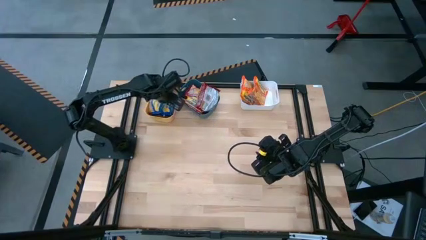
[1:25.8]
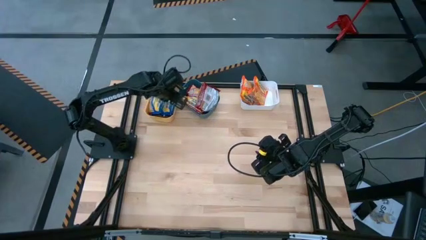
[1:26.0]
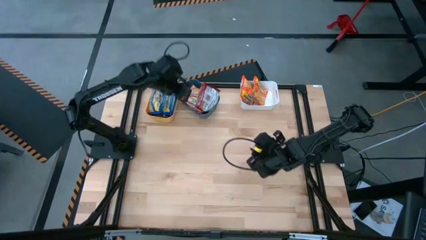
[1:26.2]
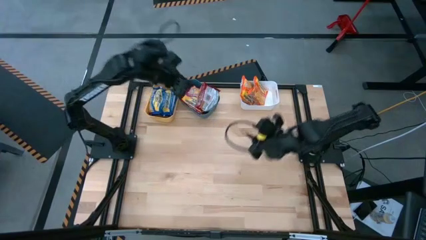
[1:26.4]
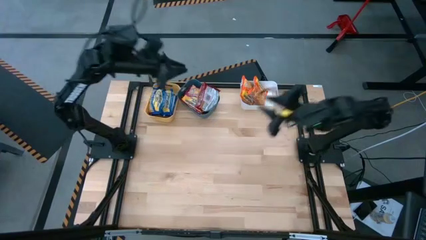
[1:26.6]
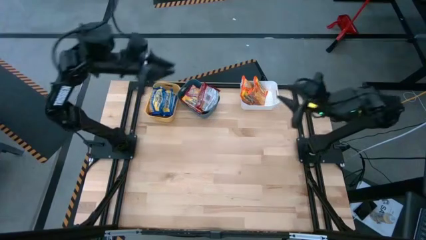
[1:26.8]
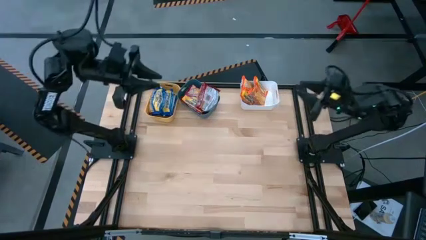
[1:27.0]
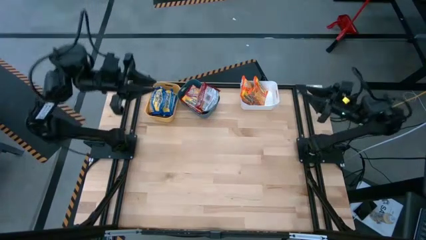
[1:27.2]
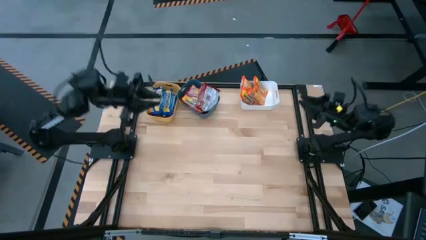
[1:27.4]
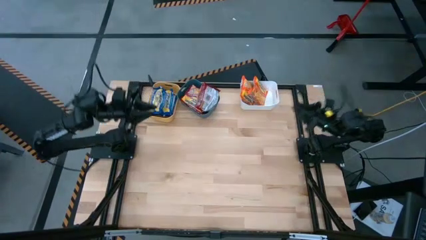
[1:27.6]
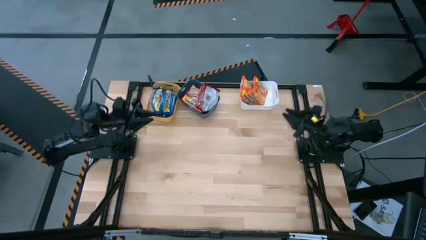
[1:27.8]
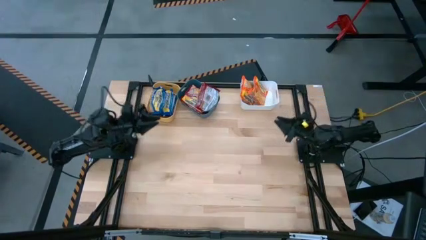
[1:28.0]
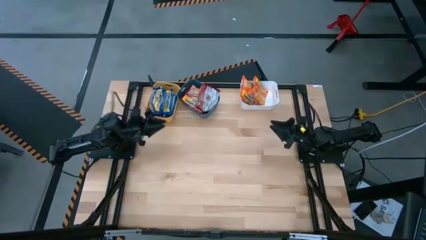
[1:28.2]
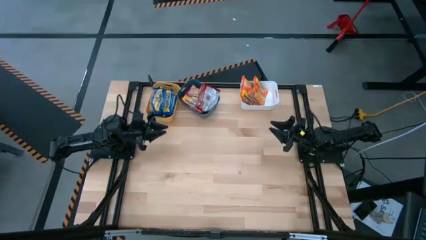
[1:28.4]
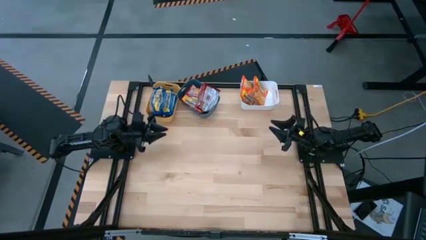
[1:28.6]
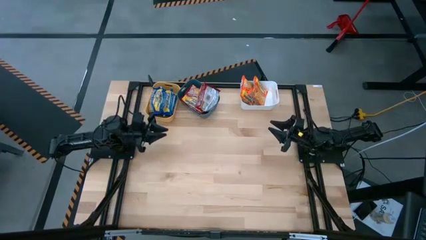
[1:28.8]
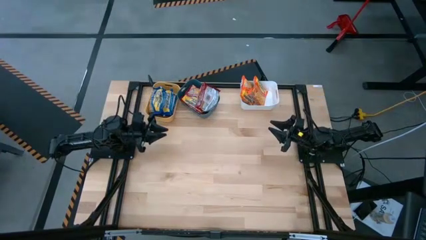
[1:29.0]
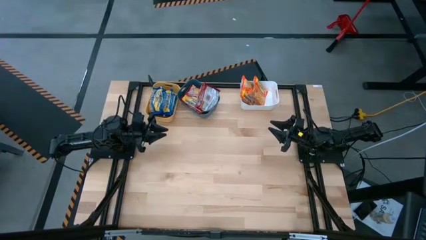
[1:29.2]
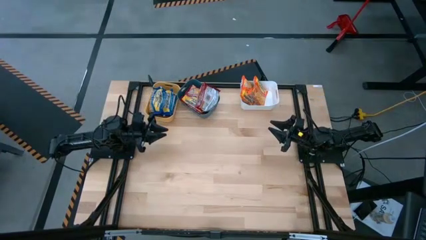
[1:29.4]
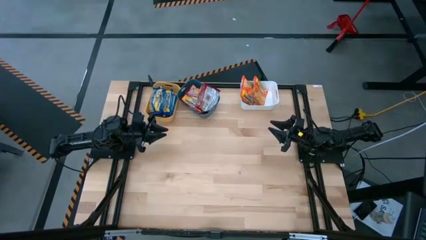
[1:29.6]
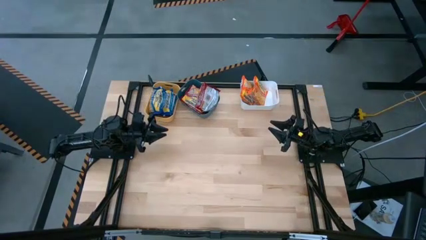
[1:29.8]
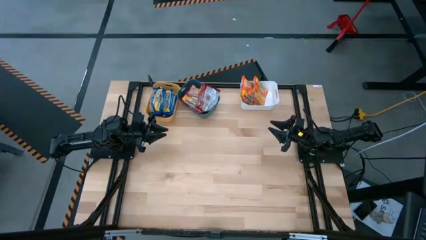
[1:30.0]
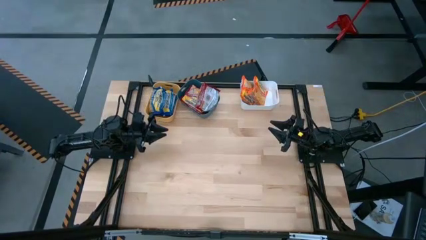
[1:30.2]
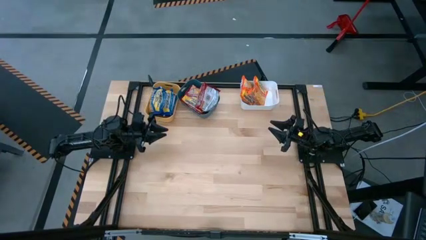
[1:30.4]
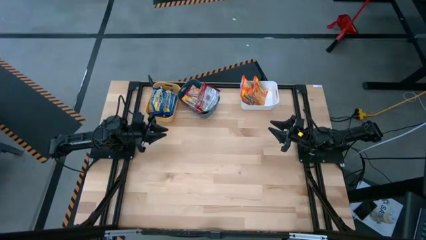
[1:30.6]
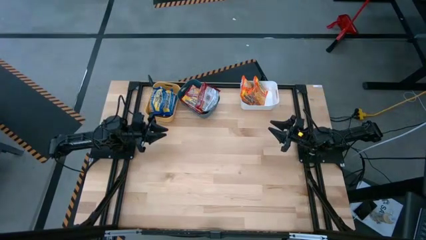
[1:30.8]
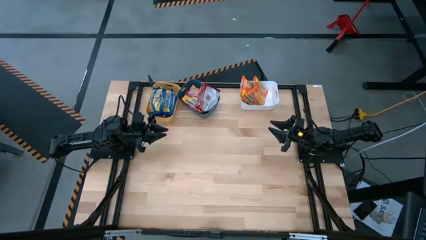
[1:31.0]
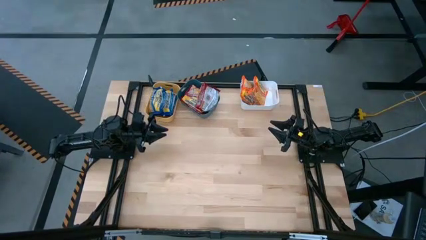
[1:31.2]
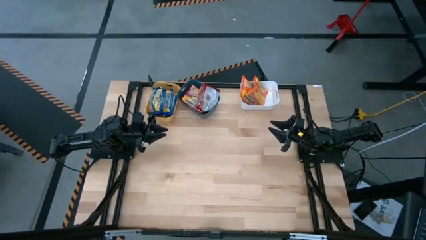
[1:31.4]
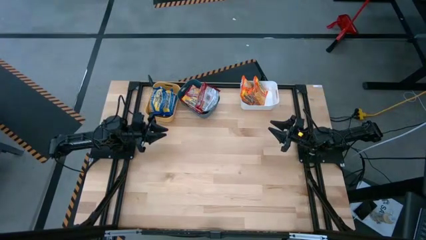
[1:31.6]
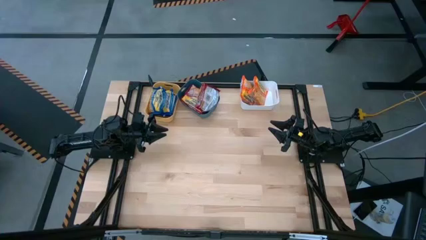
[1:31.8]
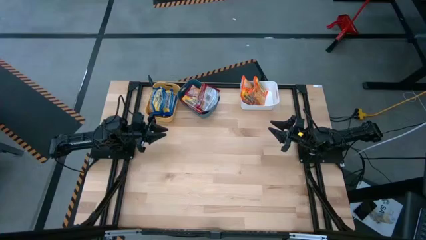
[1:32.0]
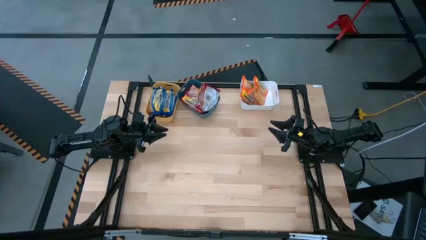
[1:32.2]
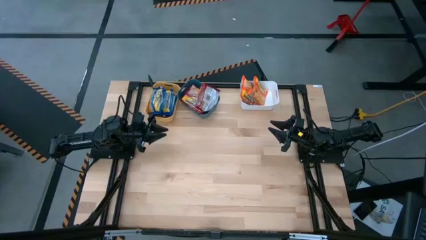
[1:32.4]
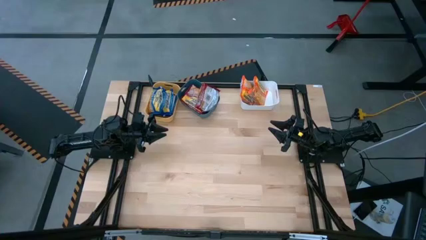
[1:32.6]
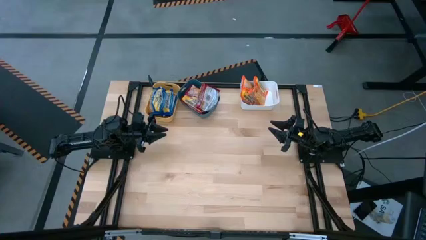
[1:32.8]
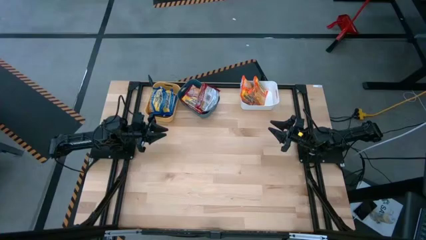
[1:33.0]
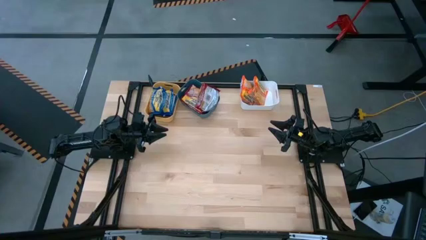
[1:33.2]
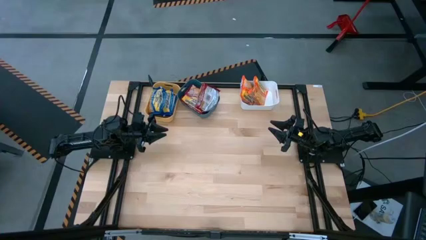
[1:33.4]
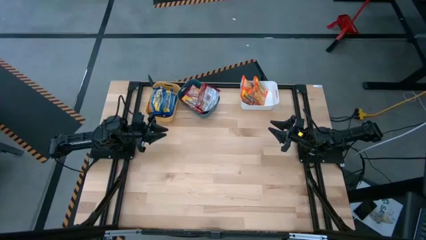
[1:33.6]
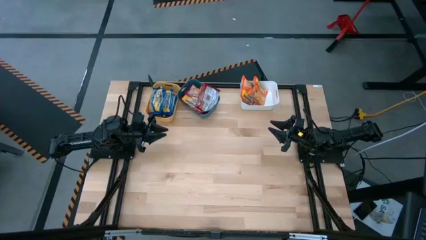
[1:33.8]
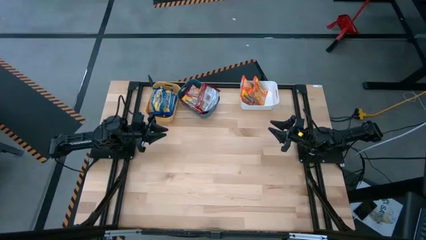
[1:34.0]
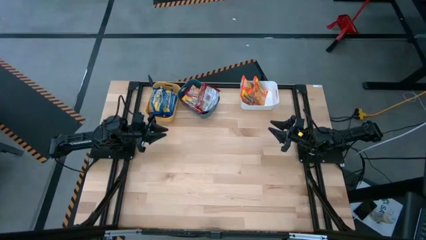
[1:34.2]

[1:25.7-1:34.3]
Task: Sort Maruchan noodles
Return to Home Position

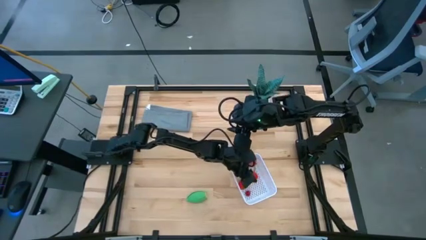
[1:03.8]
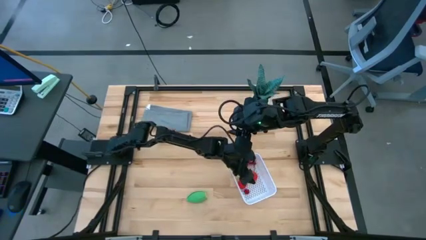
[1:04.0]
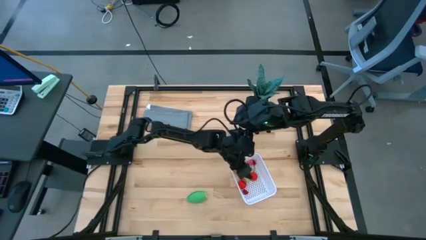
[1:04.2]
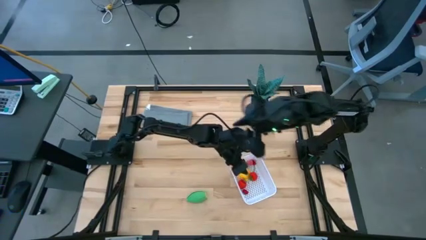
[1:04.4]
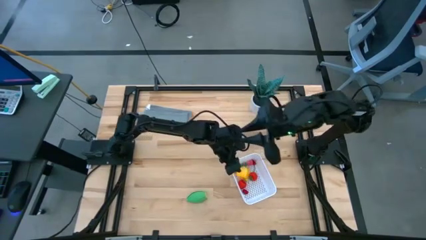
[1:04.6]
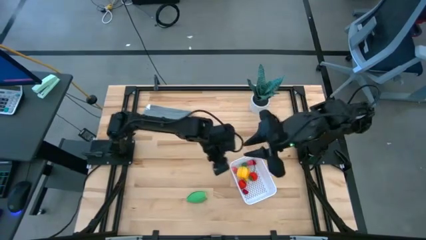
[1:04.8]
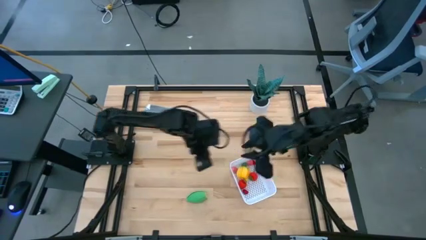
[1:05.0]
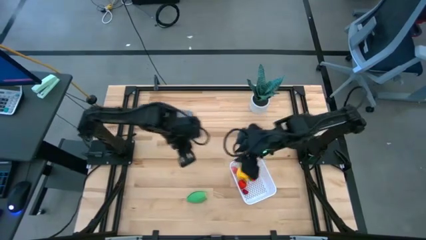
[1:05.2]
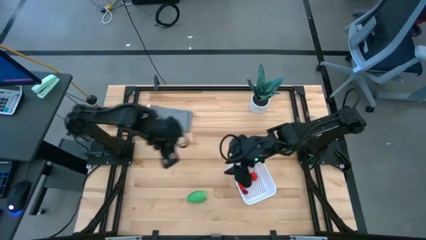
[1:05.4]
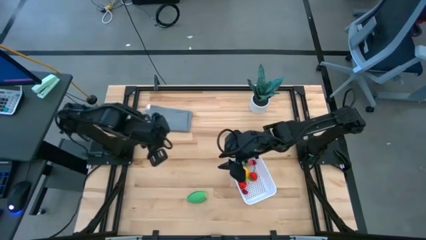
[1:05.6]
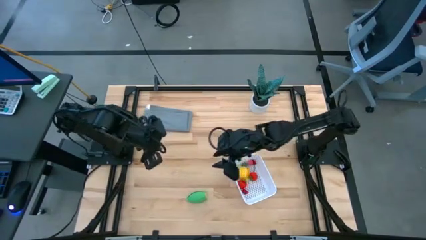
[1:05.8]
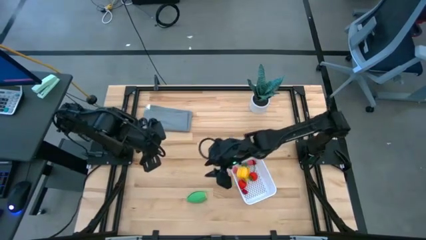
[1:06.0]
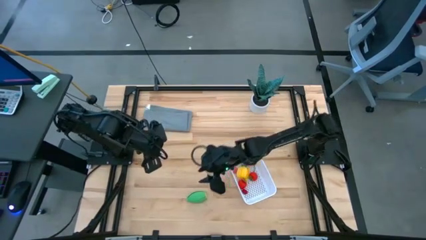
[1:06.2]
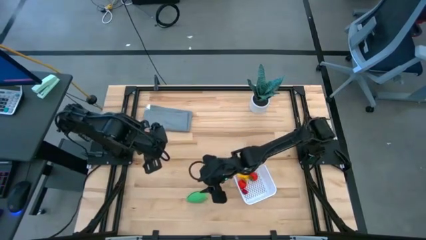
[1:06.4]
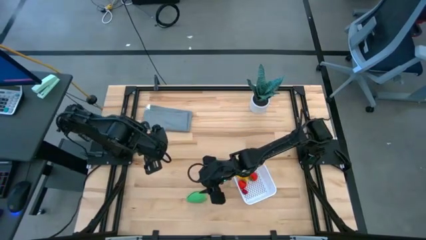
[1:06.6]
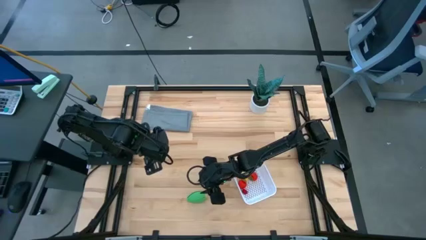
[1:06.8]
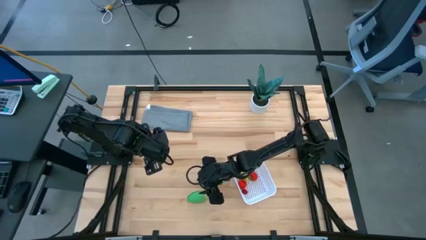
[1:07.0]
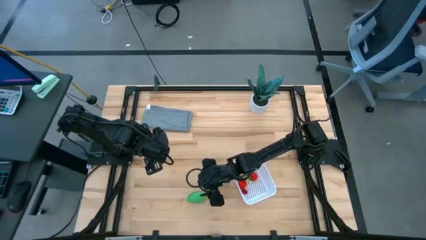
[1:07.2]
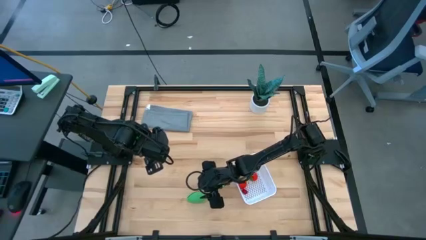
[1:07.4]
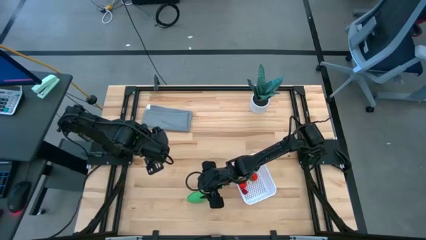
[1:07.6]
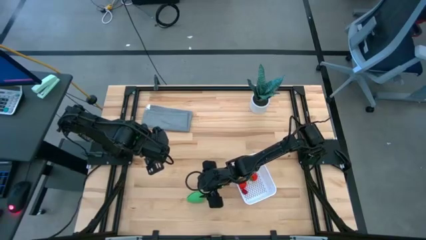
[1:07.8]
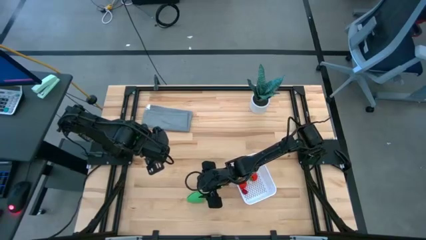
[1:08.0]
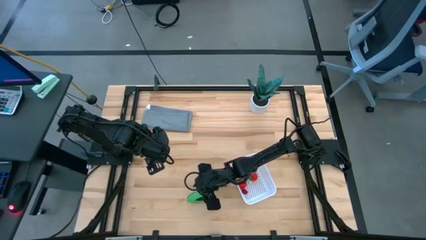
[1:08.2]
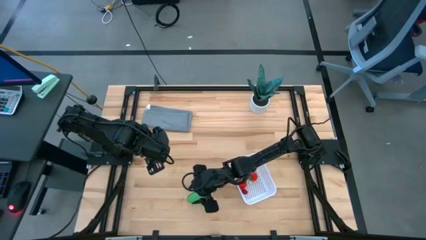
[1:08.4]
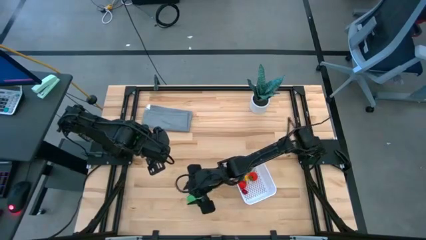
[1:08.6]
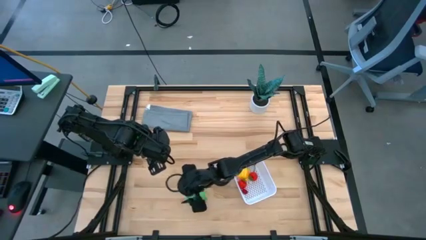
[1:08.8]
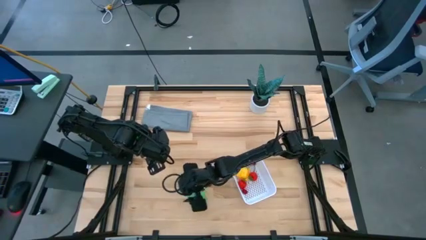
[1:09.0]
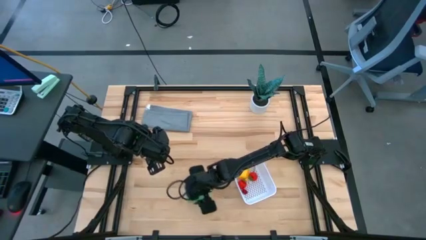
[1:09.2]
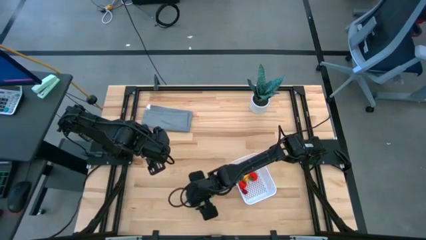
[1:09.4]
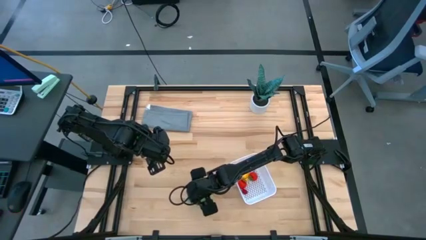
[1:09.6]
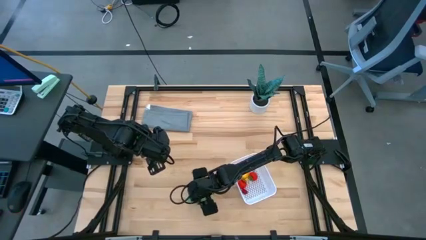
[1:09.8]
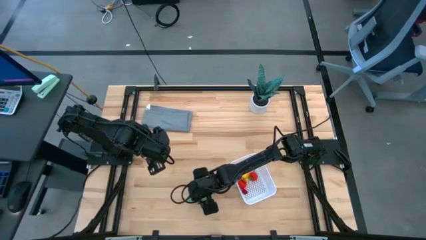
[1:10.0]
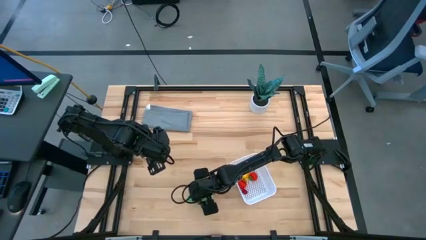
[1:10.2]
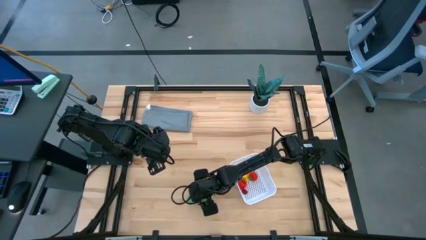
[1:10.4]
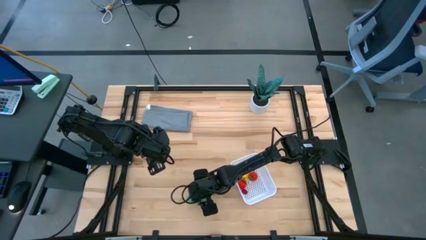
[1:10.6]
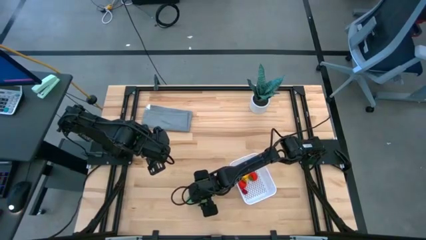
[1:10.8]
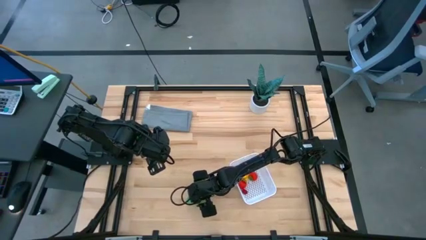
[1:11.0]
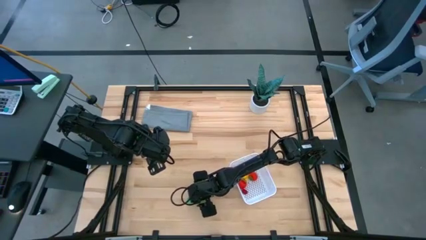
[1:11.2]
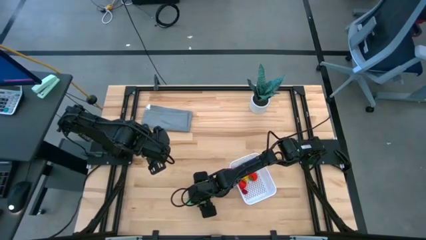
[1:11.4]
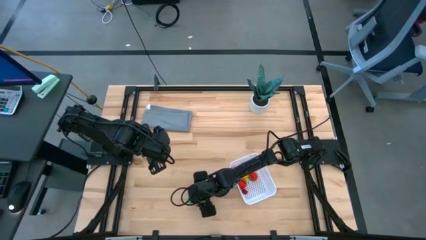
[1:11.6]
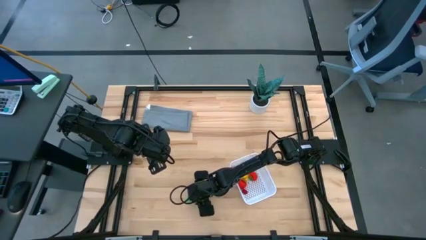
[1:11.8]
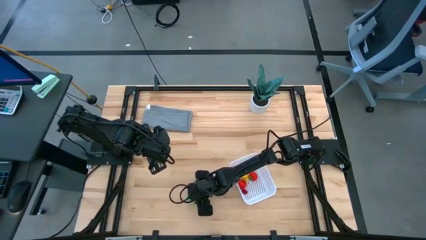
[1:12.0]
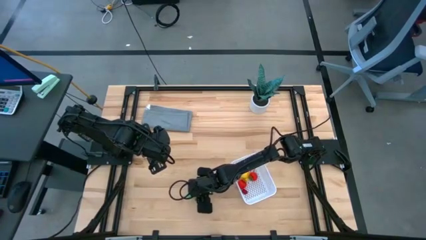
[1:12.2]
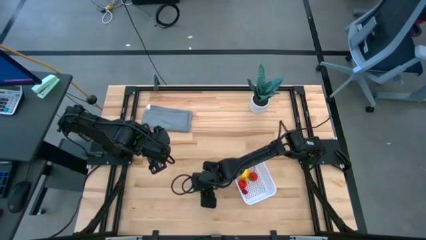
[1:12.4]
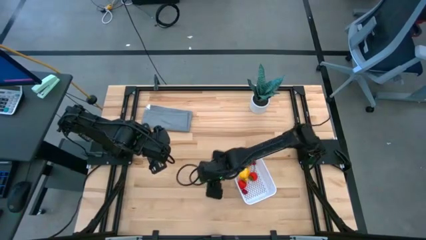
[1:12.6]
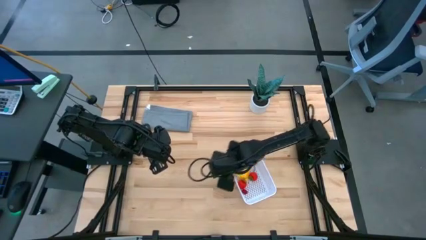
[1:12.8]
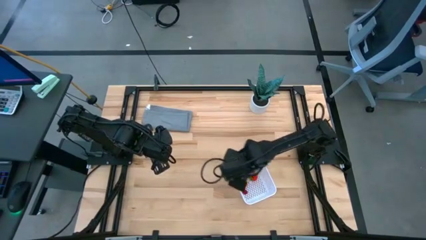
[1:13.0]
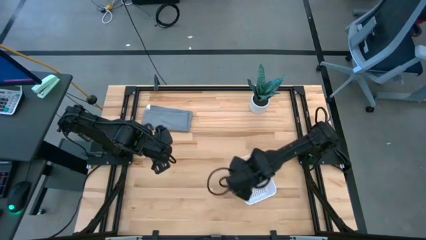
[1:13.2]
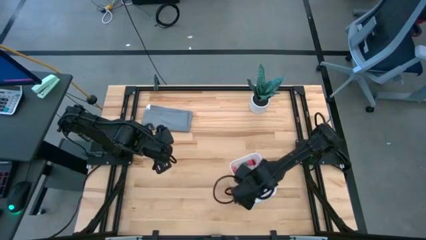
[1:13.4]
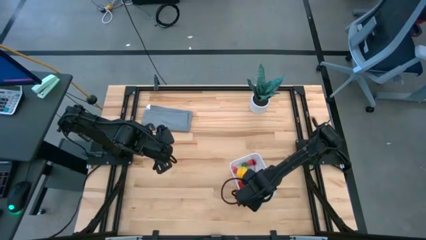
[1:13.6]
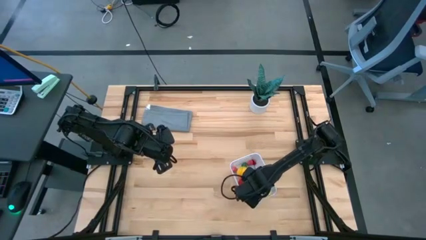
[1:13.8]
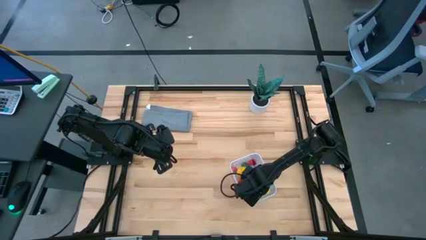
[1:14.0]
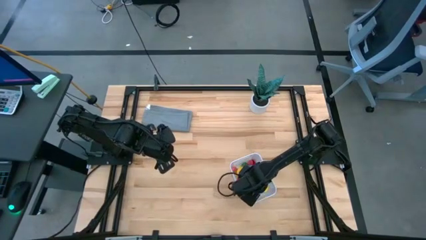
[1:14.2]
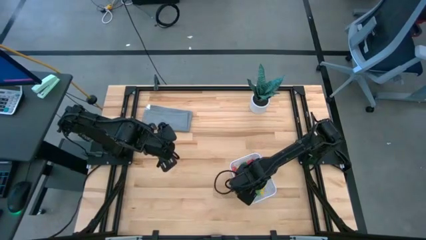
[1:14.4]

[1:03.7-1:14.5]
Task: Pick and placing Produce into tupperware
Put the green corn into the white bin
